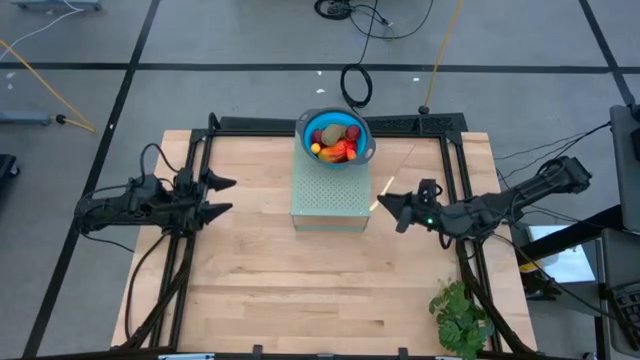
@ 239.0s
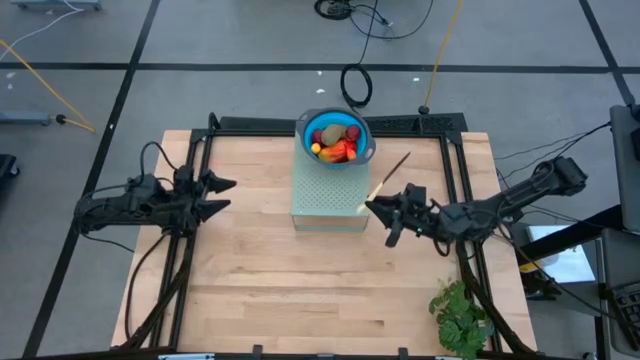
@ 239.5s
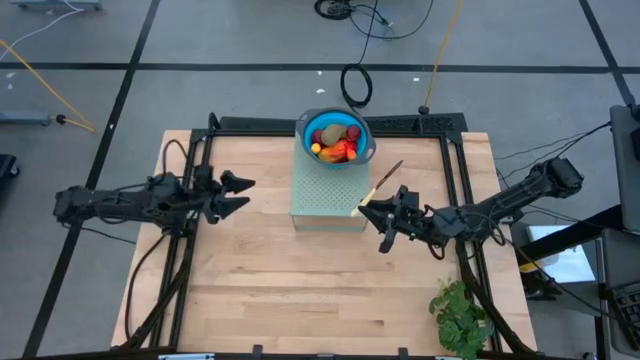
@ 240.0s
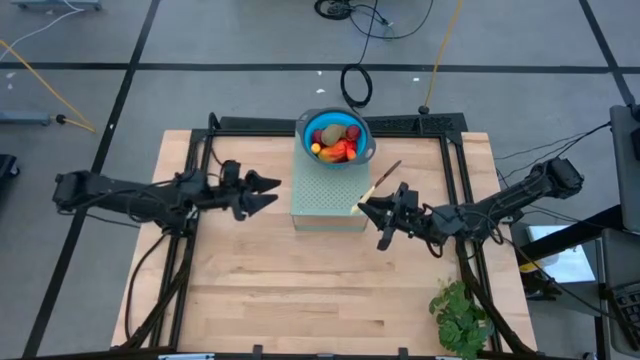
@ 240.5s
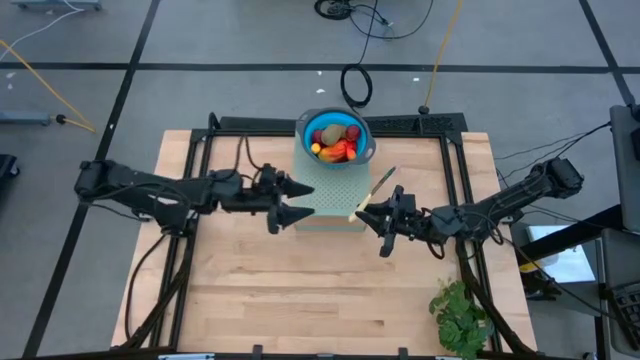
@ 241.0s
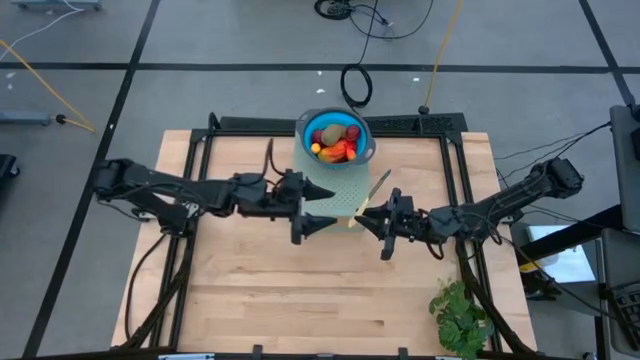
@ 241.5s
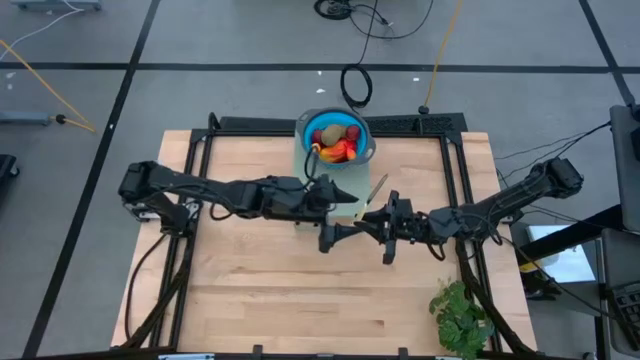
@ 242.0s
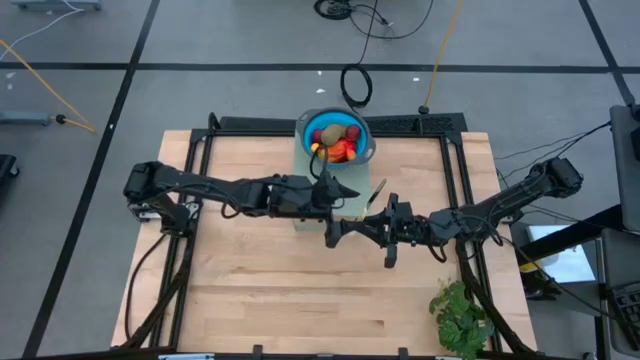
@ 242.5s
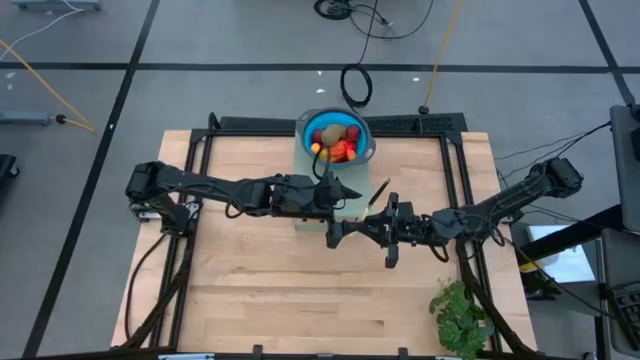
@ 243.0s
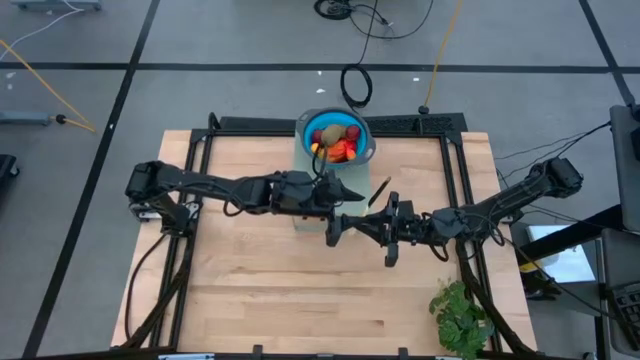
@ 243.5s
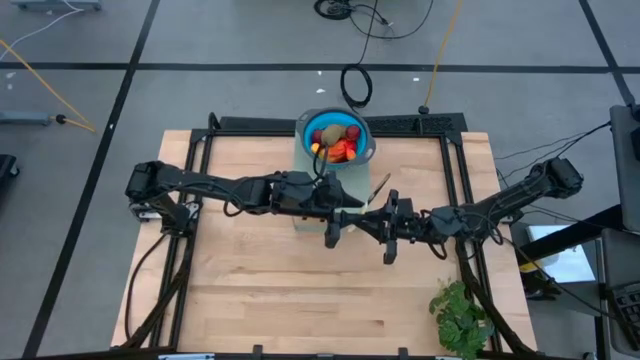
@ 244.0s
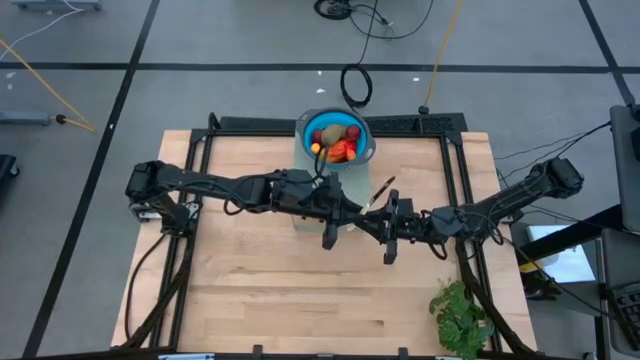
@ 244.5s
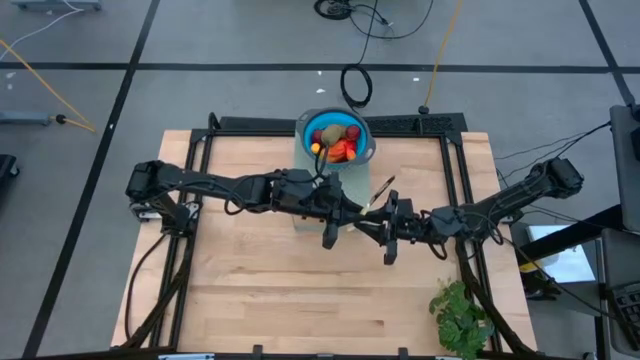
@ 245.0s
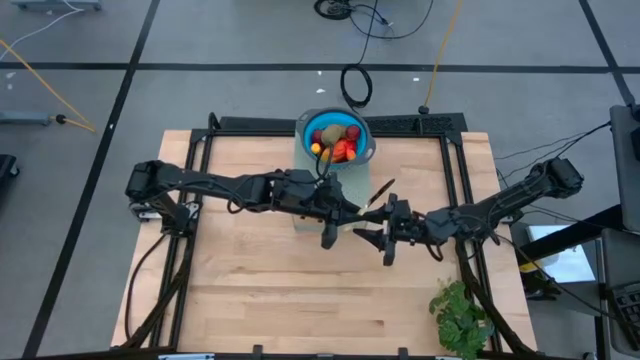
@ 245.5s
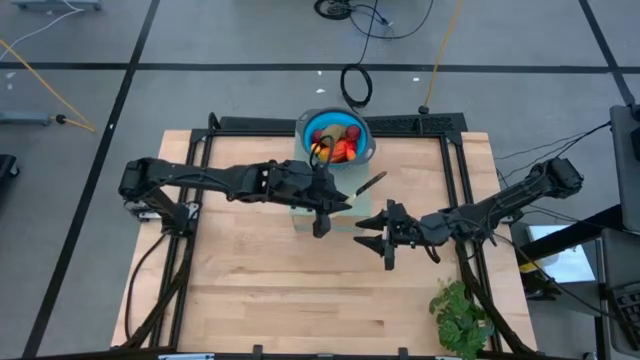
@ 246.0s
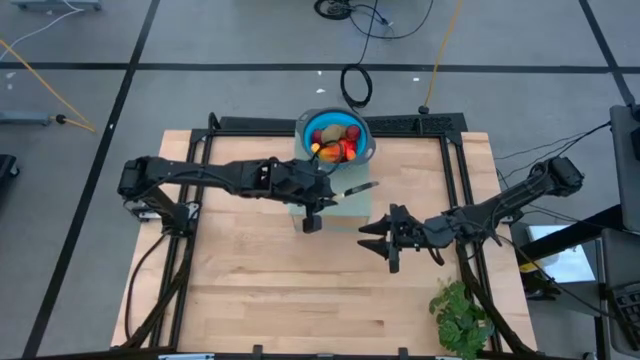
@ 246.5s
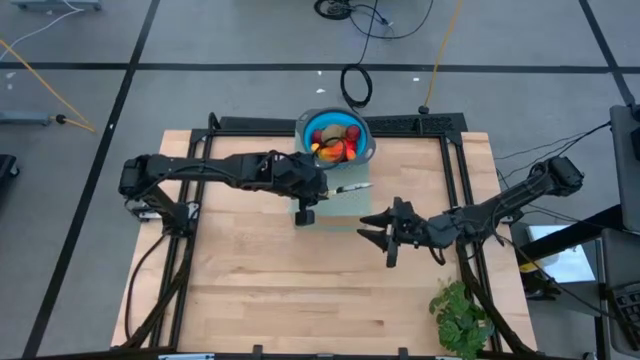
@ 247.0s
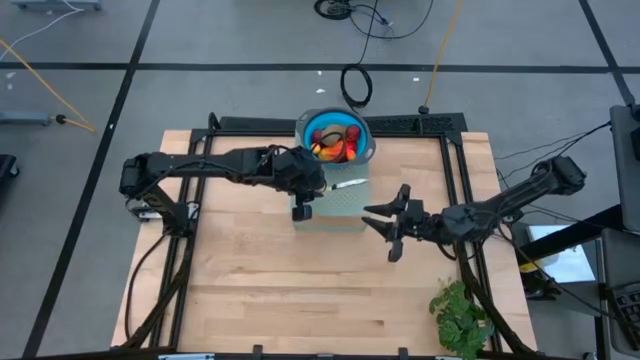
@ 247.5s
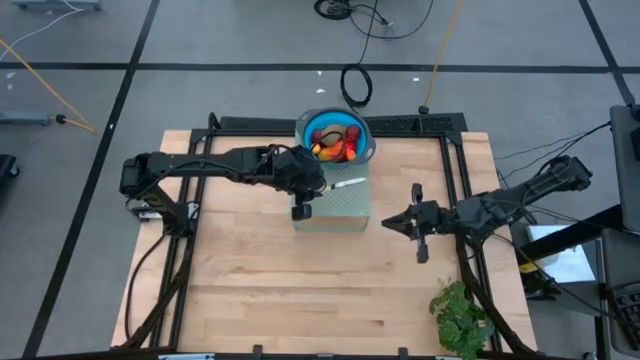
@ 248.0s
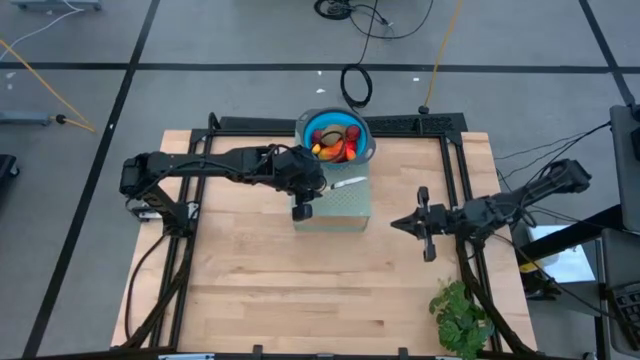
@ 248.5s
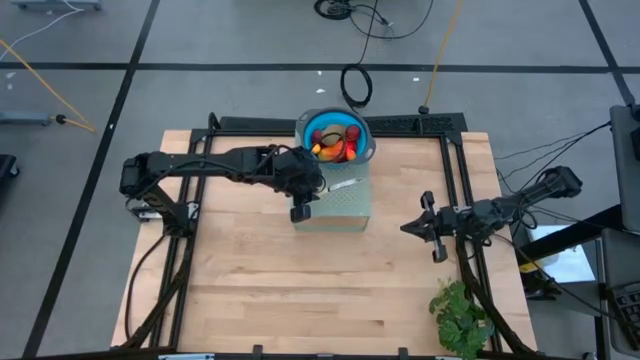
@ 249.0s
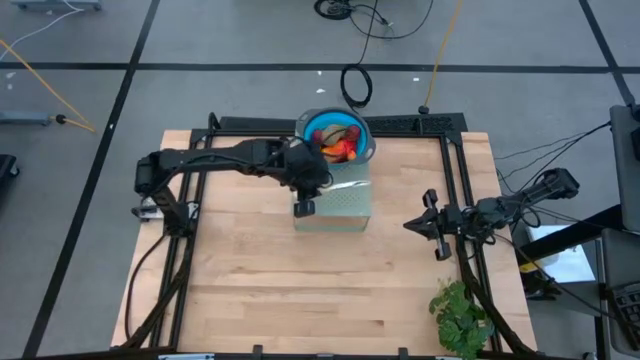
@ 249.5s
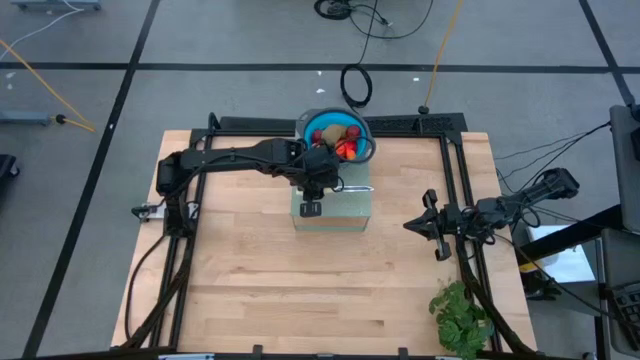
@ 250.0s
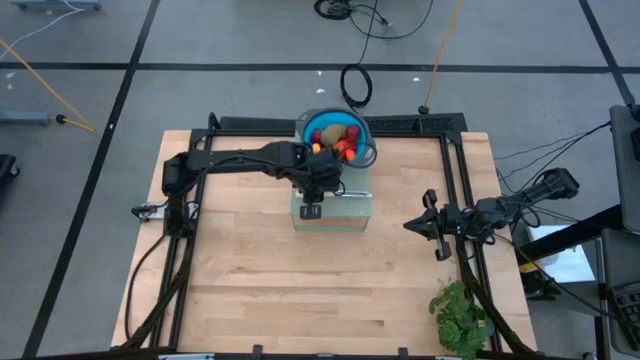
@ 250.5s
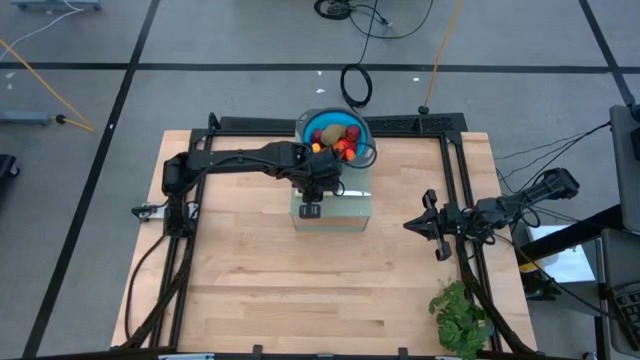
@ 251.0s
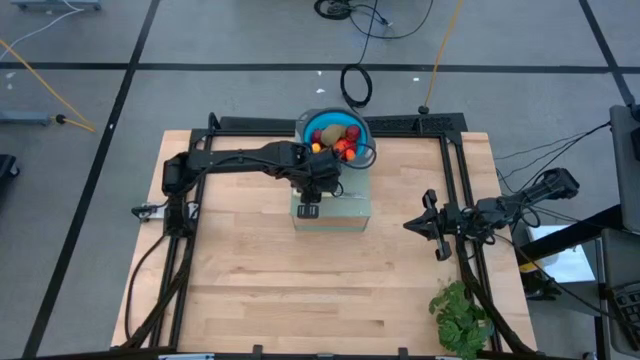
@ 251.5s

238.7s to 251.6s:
Task: Pick & Place Fruit
Put the kitchen knife on the shelf

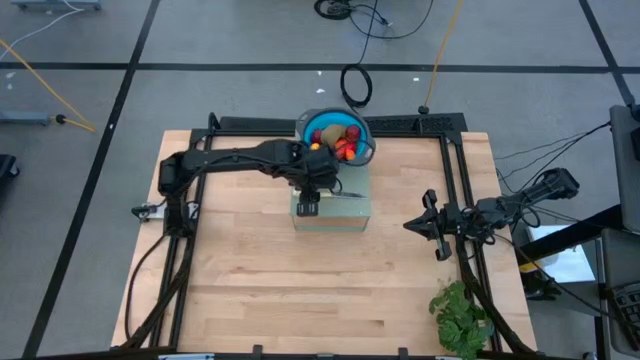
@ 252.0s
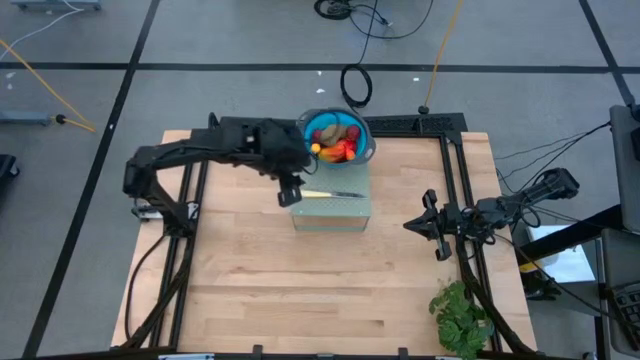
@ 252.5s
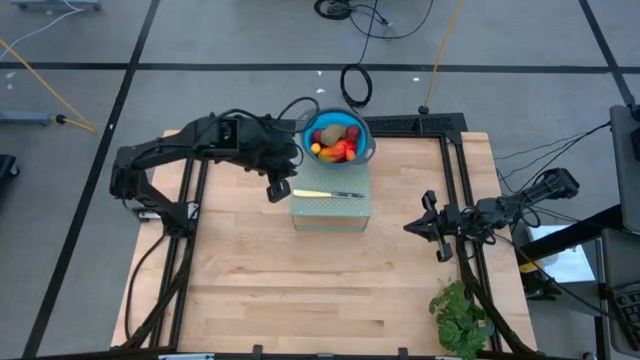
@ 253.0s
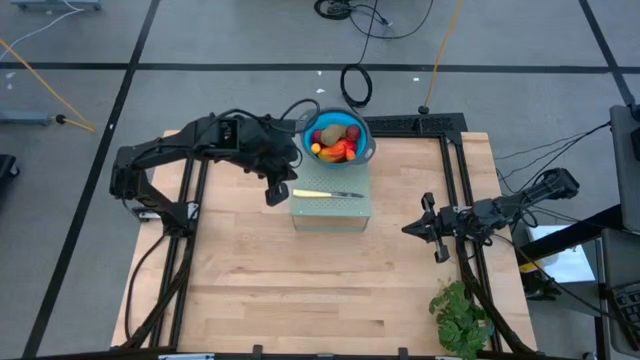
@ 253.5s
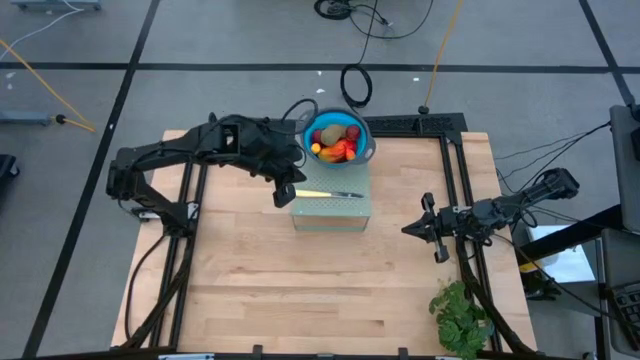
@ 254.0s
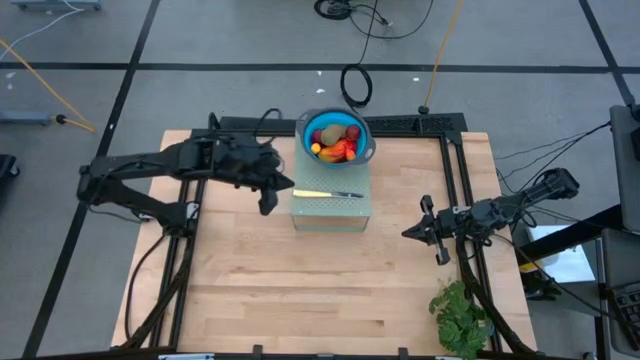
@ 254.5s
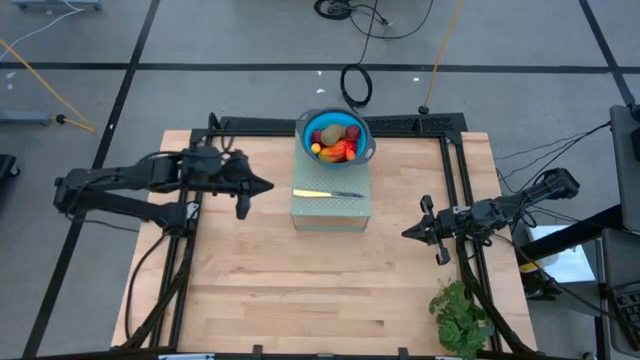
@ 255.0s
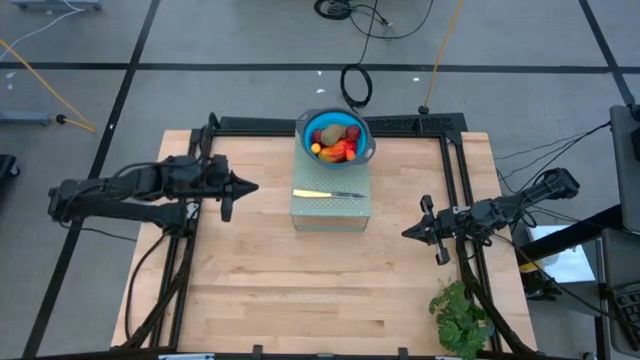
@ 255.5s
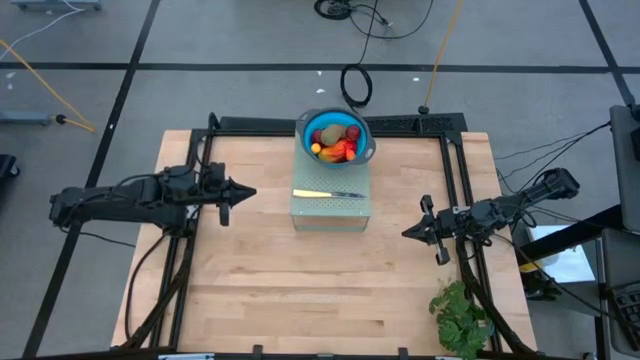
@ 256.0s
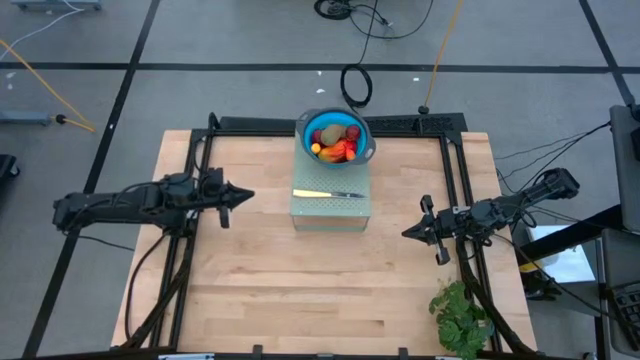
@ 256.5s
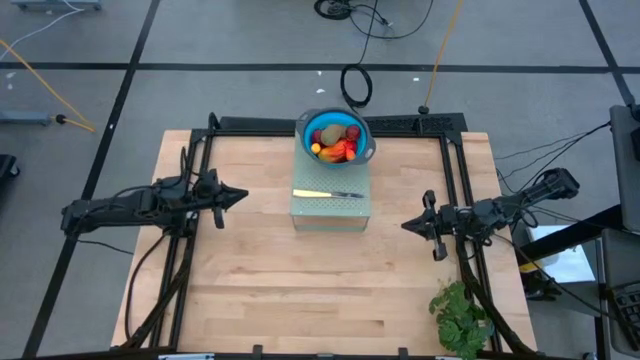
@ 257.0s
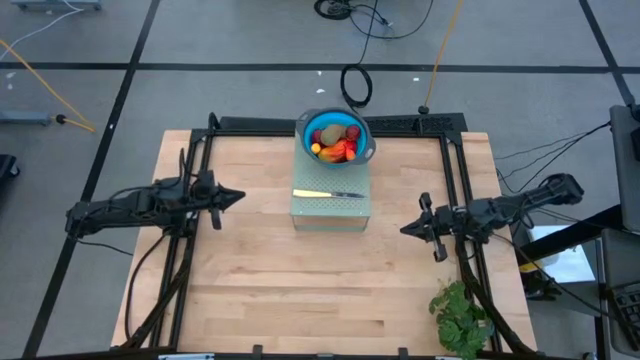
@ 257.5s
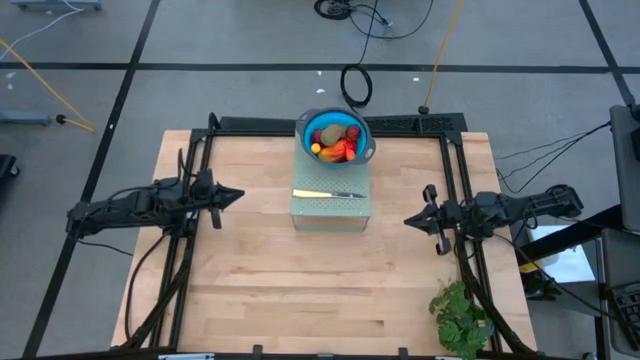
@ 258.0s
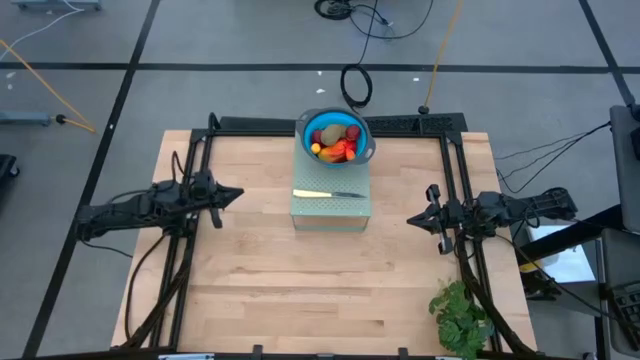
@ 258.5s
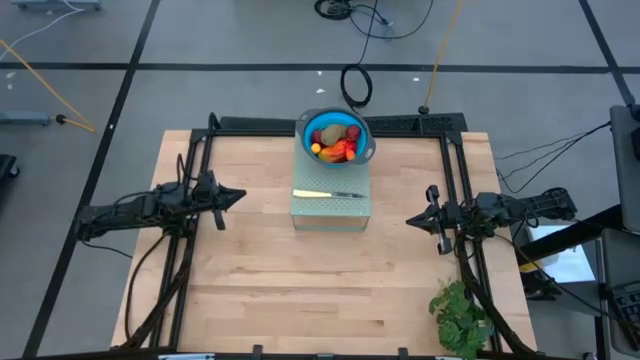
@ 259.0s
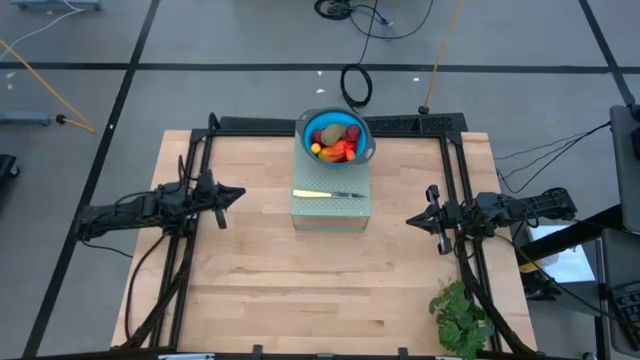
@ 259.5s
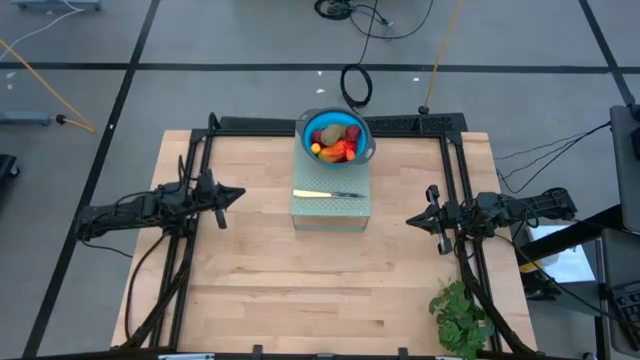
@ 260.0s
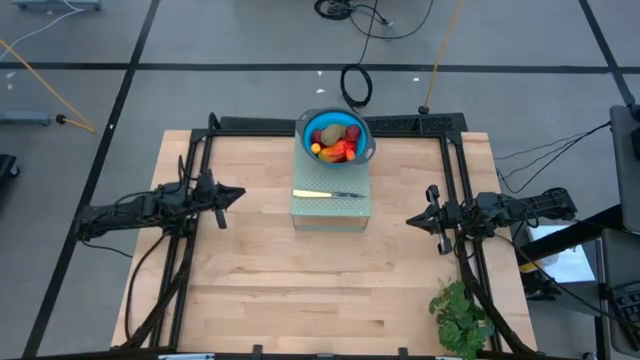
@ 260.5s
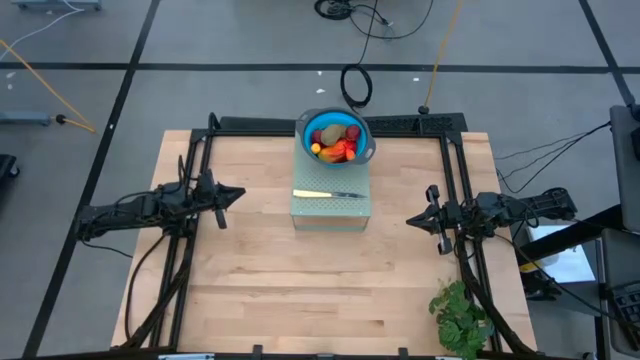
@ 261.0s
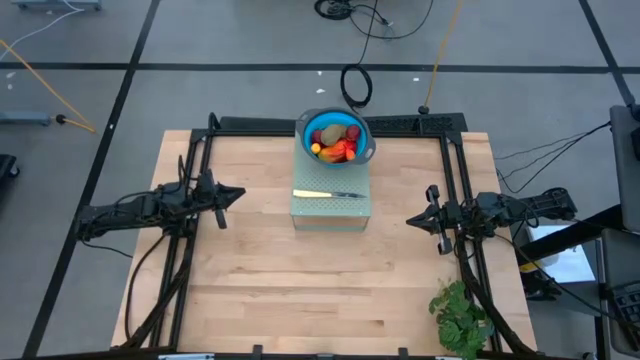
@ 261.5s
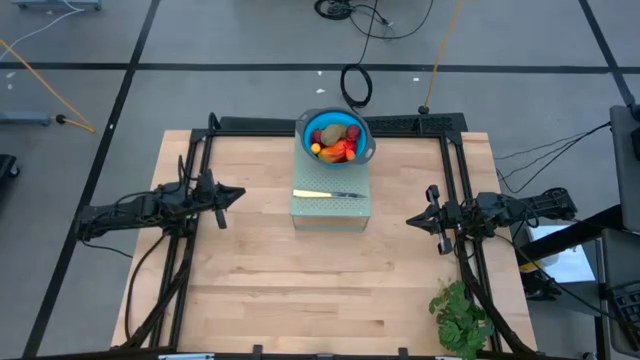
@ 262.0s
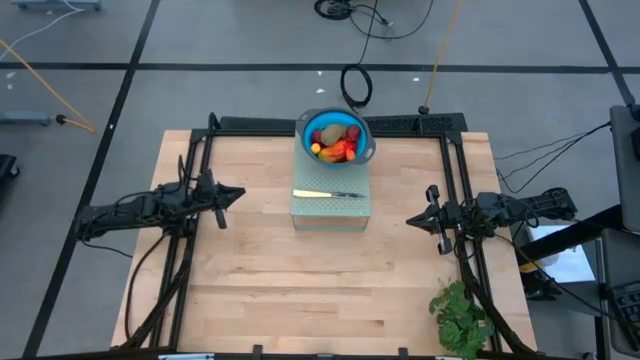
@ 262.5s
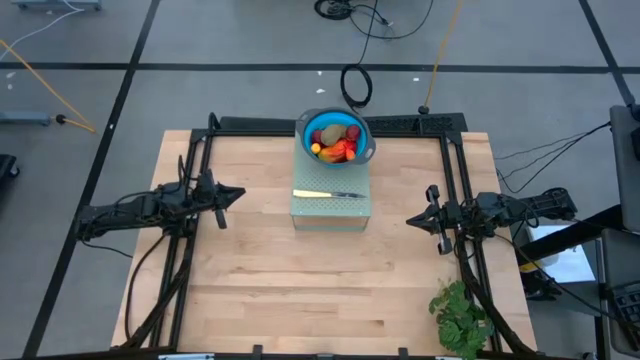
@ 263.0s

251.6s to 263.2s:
Return to Home Position
